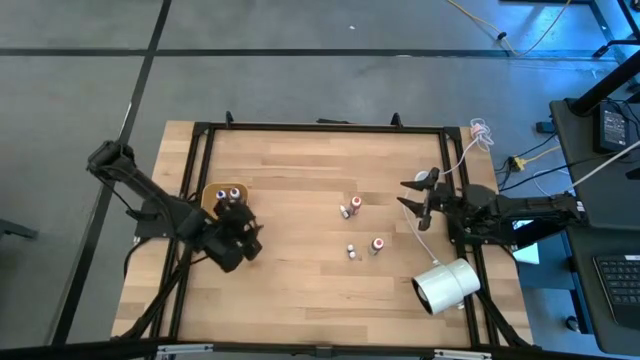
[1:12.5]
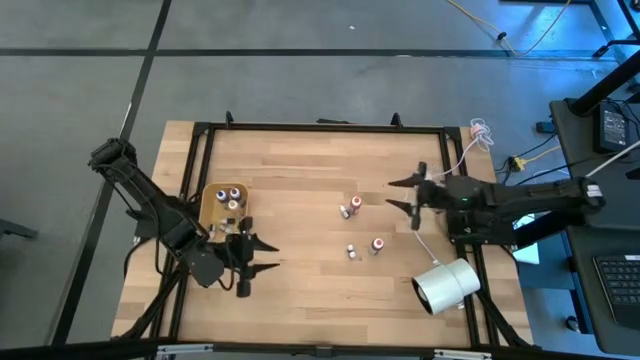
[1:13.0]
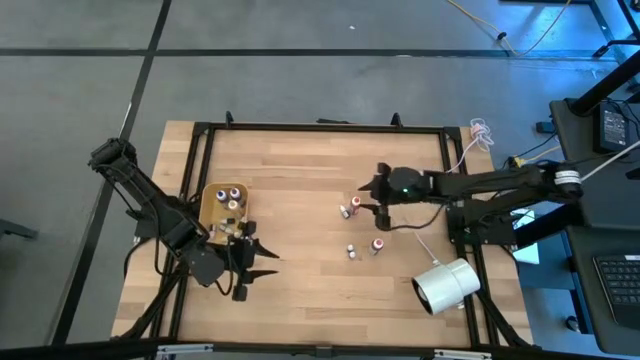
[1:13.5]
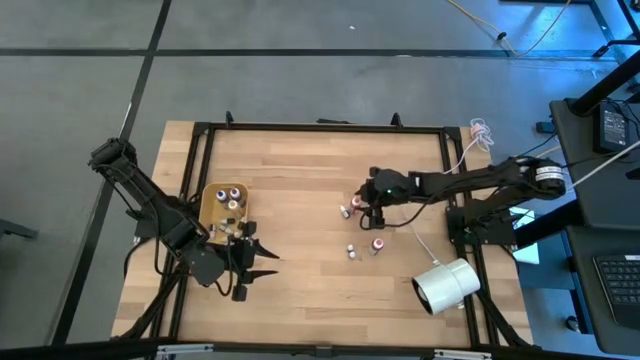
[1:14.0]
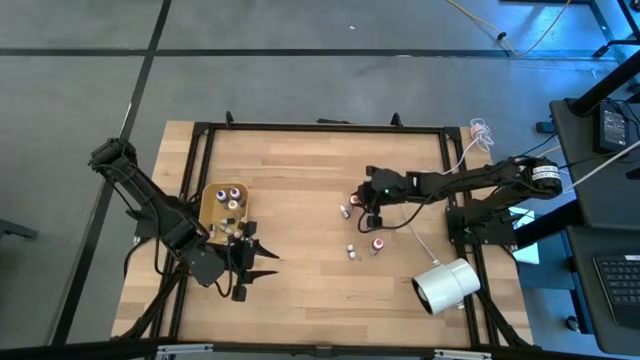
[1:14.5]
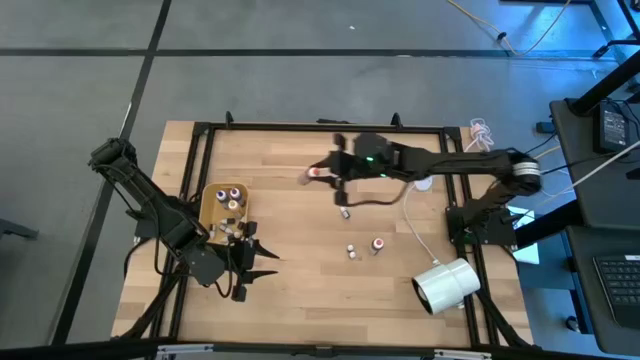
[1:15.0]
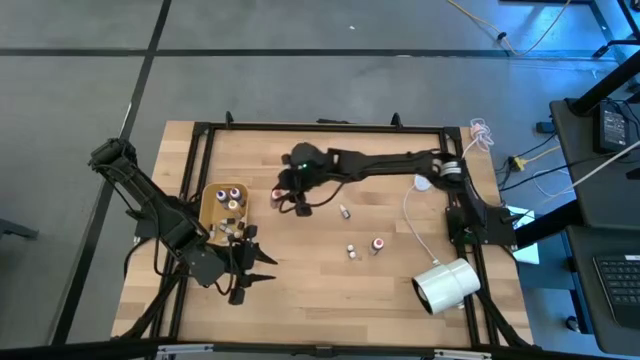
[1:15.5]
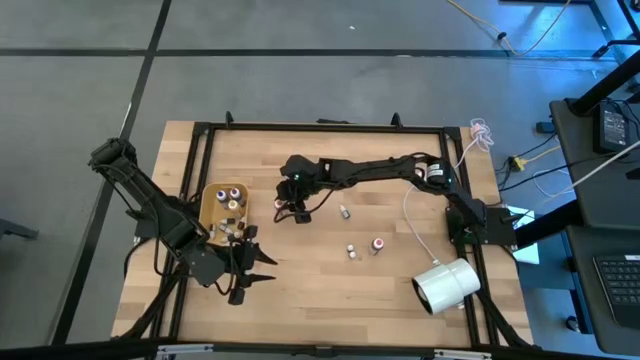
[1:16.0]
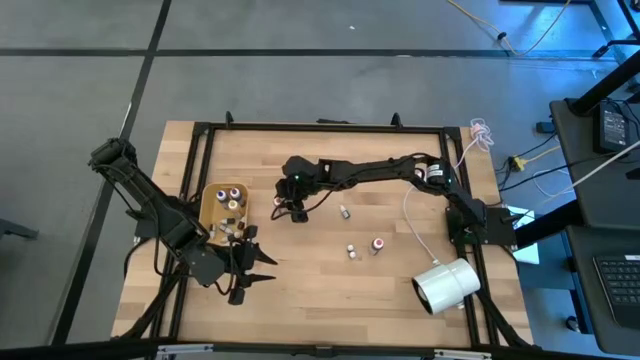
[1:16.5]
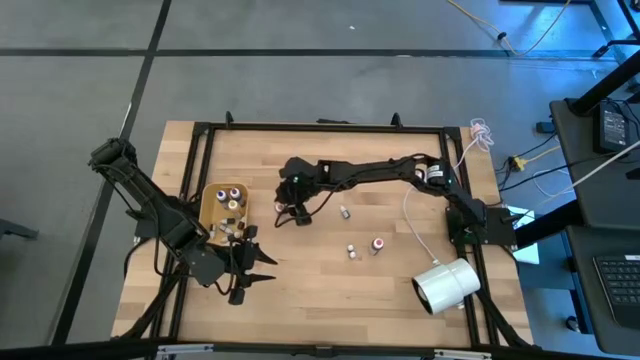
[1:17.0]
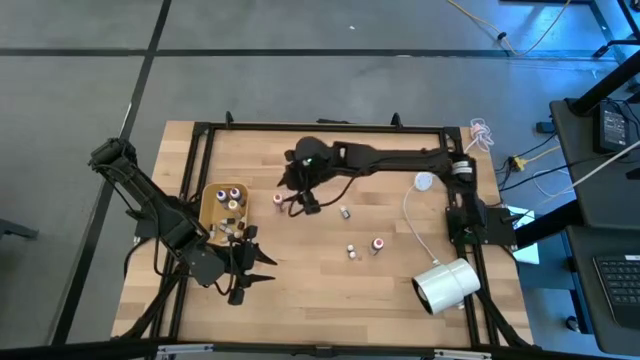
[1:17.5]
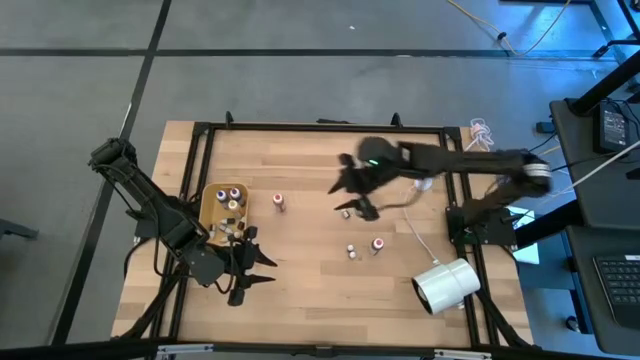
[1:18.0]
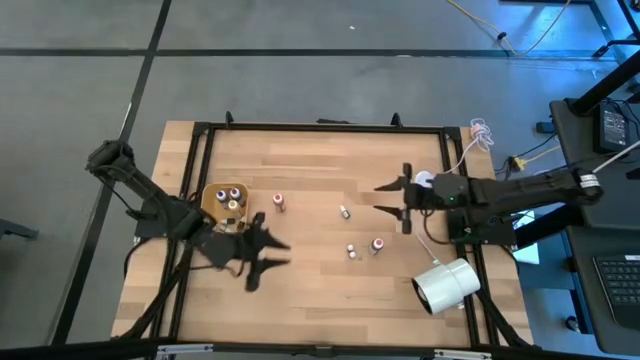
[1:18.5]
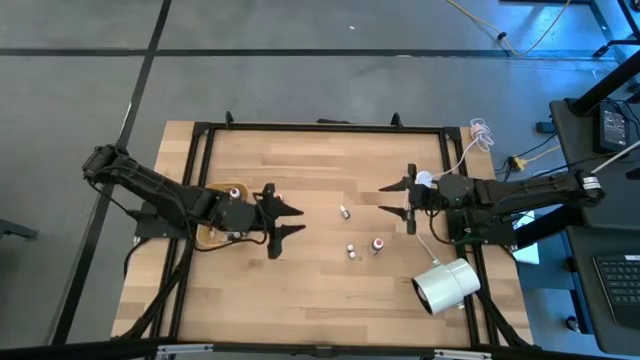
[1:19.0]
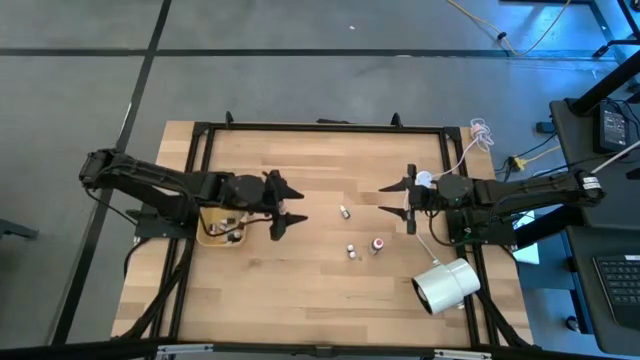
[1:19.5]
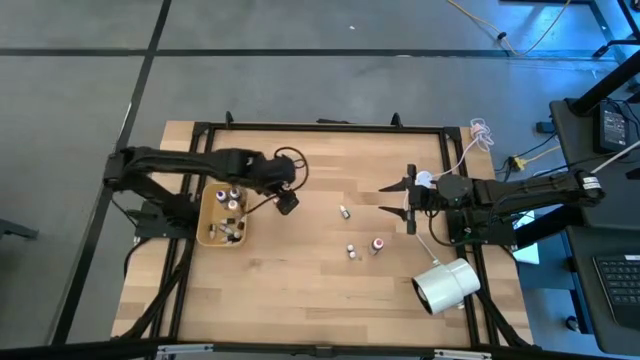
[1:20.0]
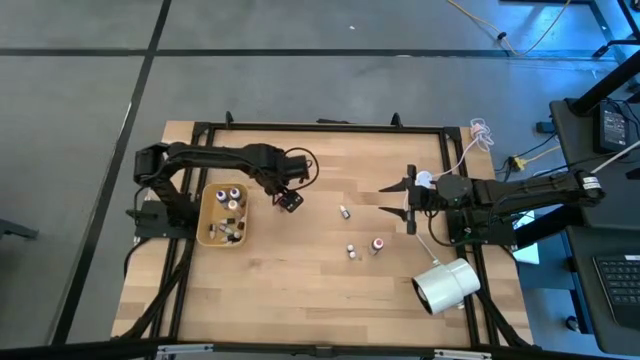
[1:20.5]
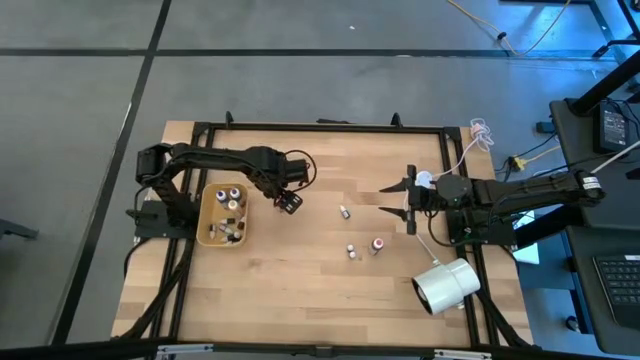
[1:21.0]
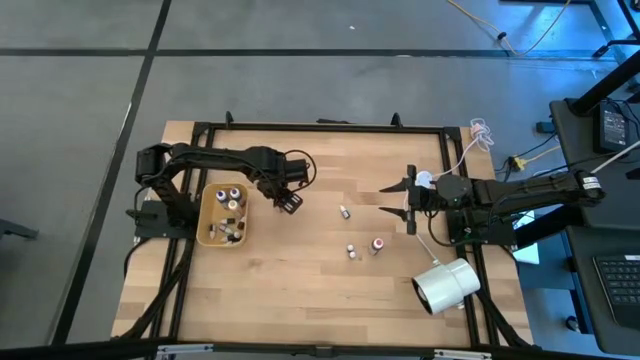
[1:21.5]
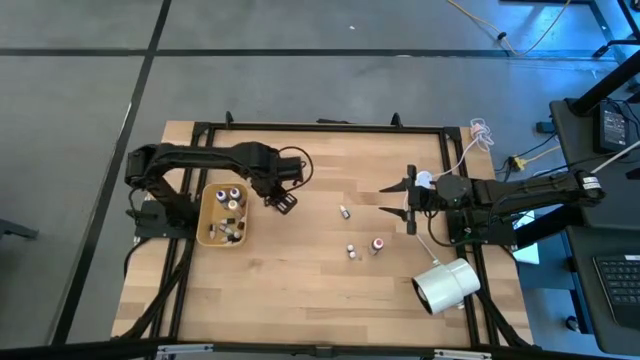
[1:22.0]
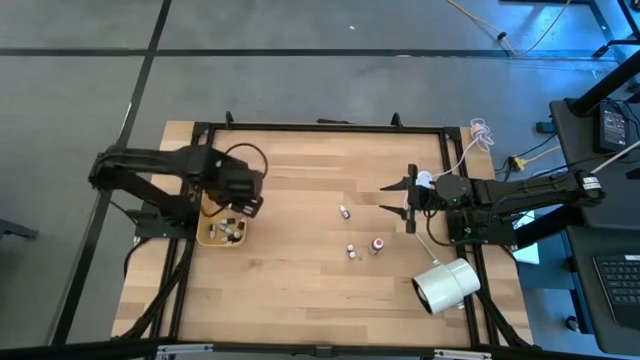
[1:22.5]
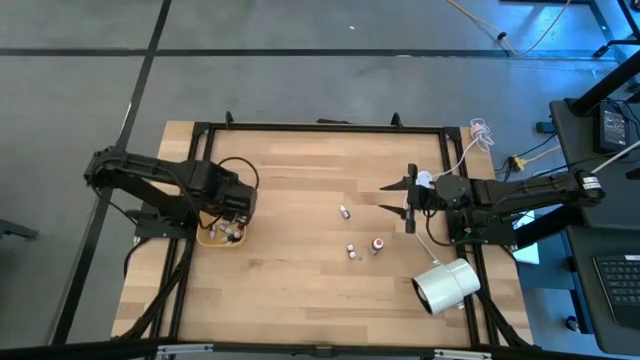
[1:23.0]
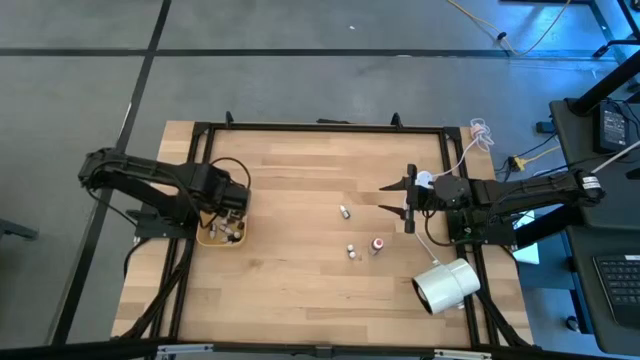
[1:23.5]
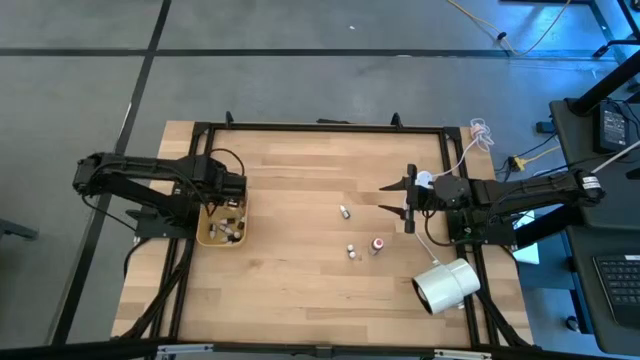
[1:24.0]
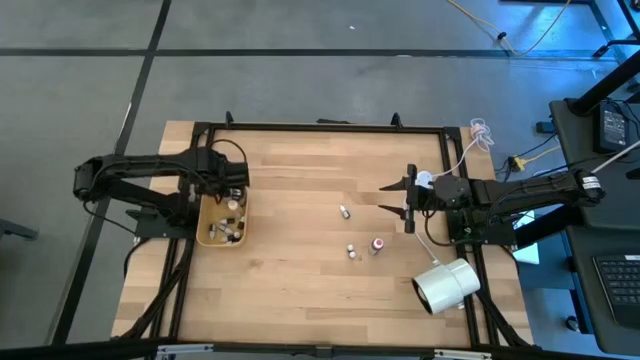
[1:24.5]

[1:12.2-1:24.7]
Task: Pick & Place food coloring
Put the large orange food coloring bottle into the yellow bin

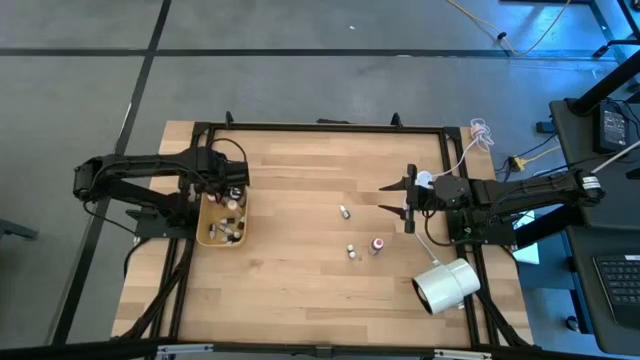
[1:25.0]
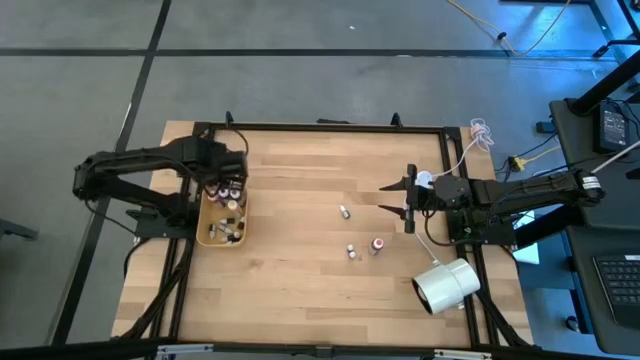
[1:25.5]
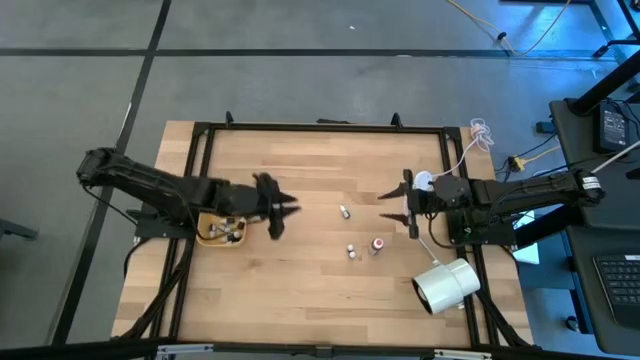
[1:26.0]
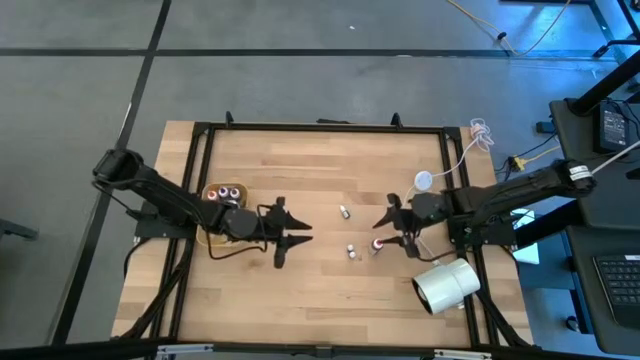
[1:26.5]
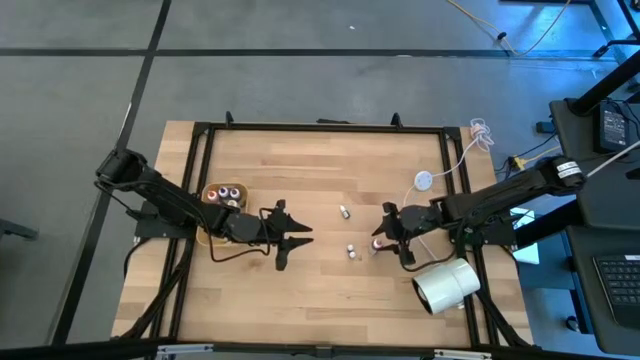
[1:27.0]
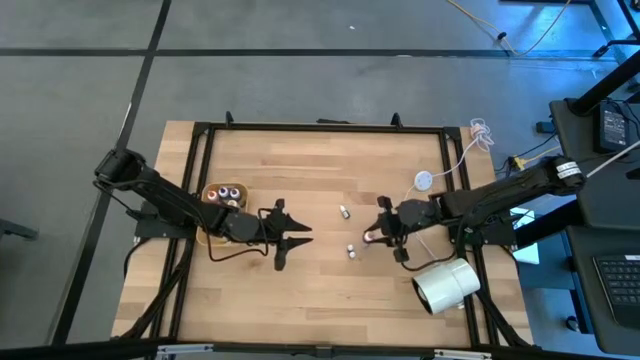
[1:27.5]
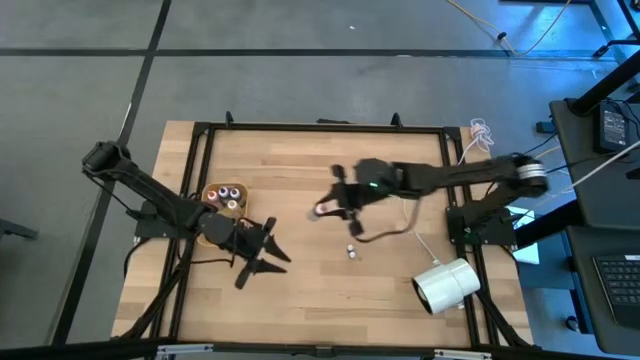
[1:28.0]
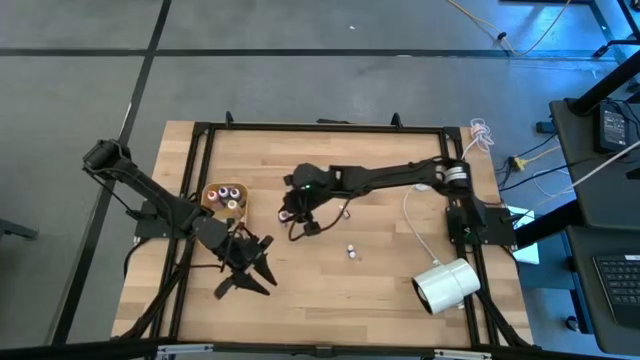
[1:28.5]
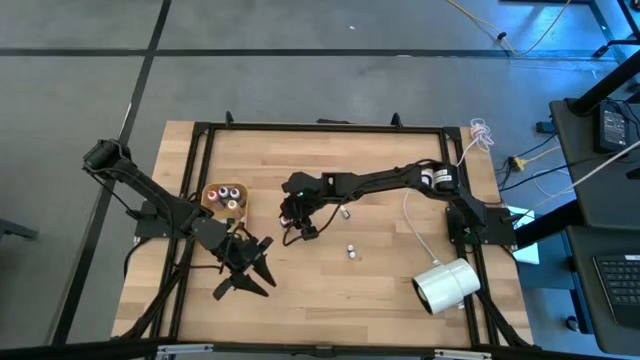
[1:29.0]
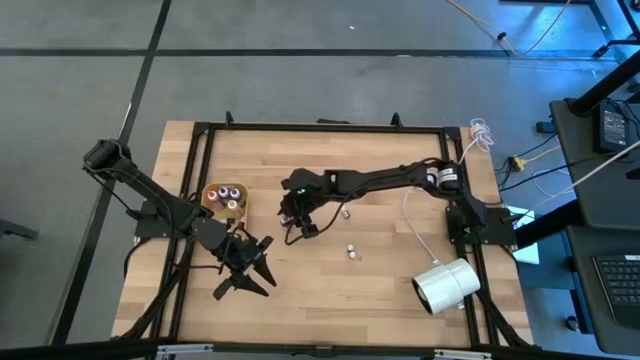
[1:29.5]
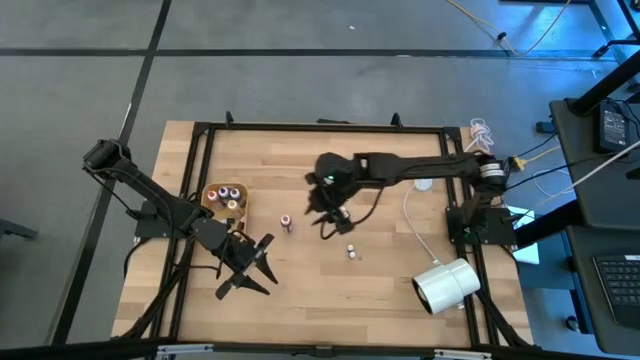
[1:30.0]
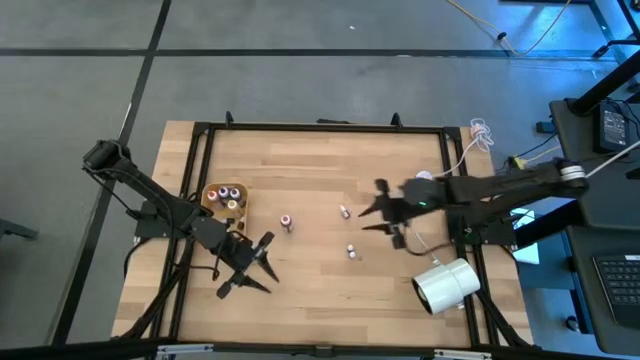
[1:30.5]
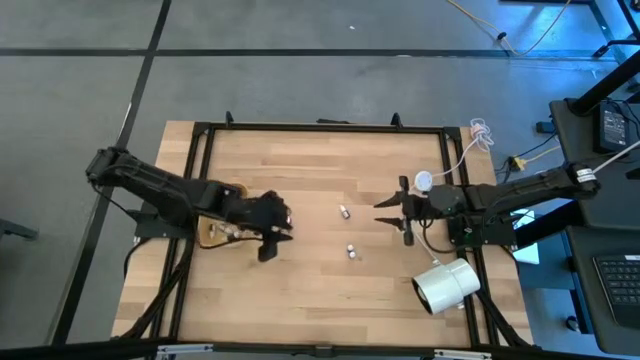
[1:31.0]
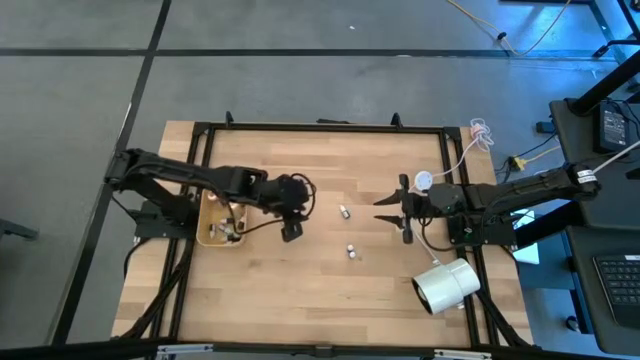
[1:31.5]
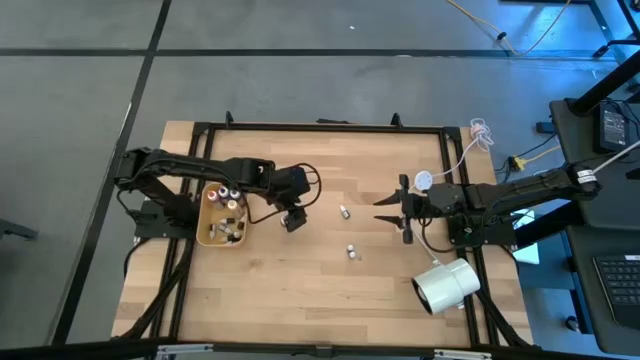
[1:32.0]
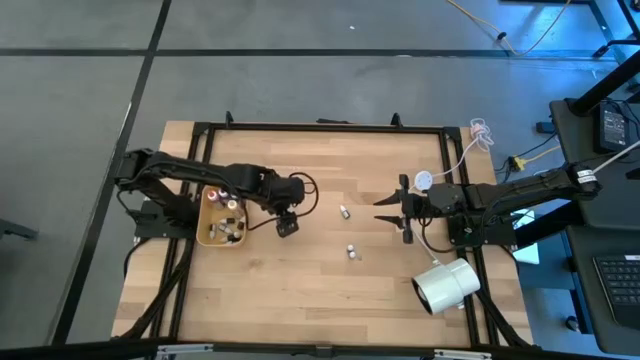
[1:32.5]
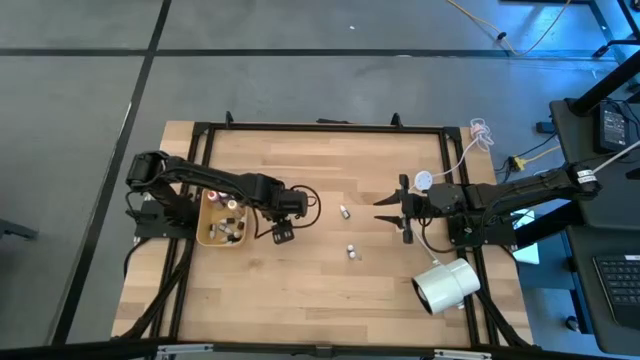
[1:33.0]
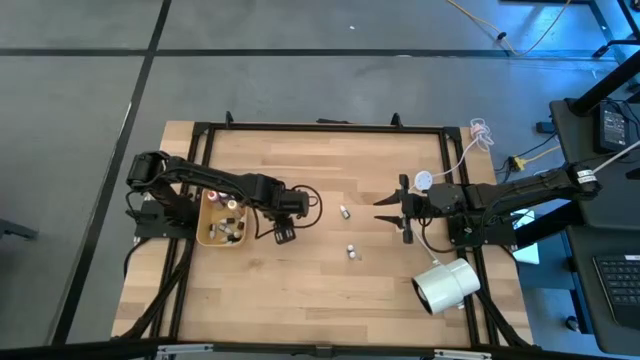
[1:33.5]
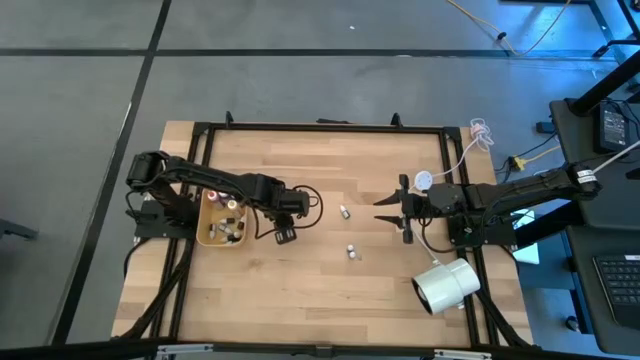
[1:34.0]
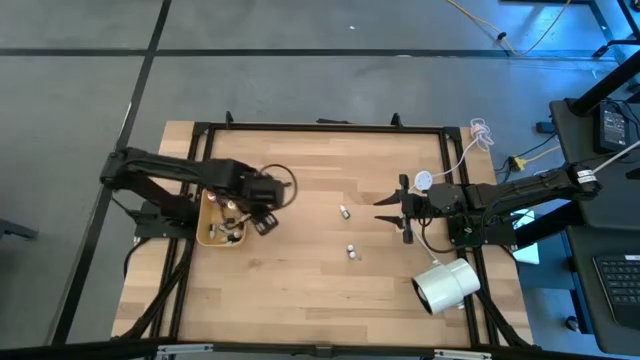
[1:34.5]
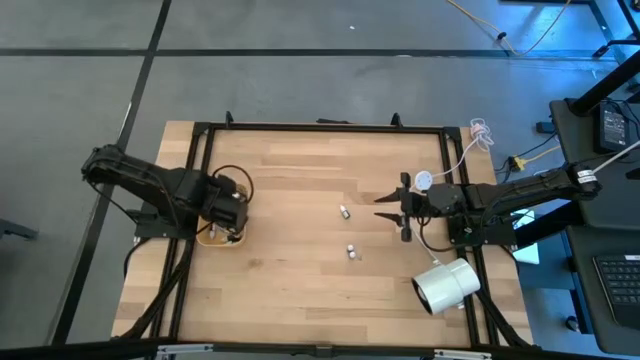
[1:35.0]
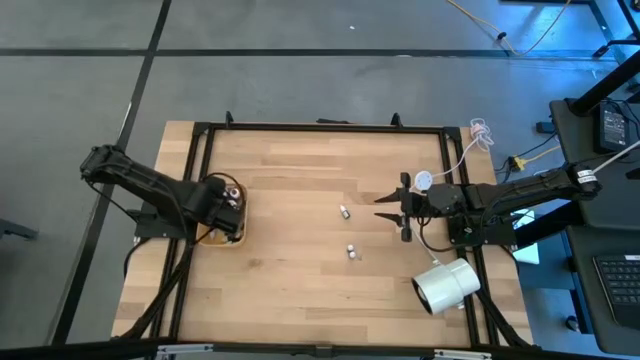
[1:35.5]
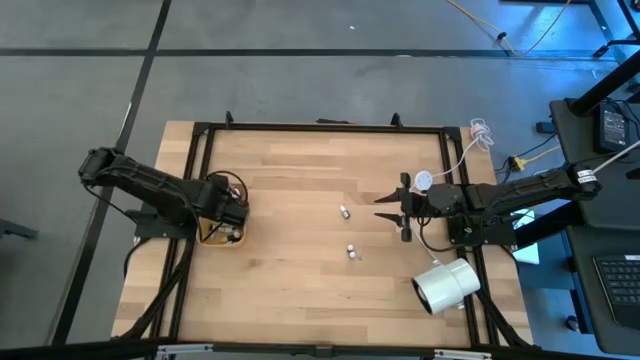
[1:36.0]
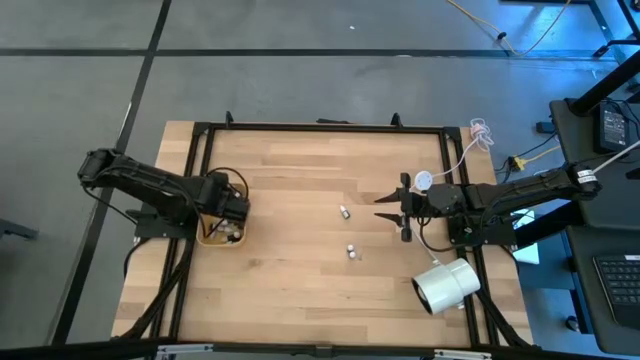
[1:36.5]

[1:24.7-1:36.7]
Put the large pink food coloring bottle into the yellow bin
